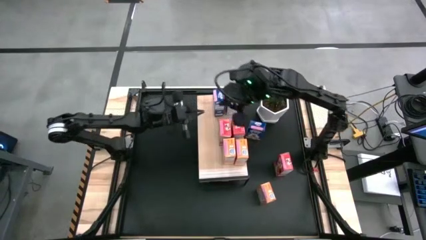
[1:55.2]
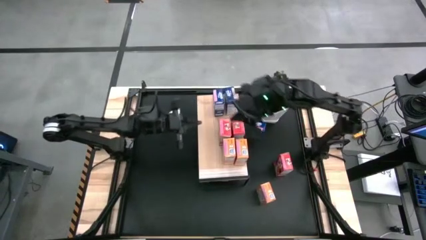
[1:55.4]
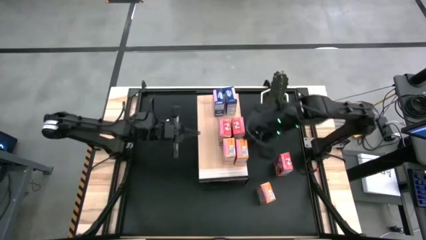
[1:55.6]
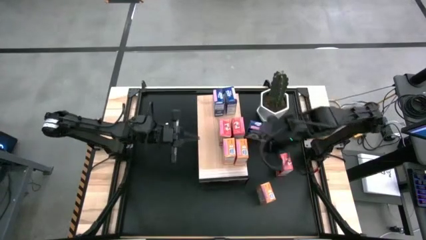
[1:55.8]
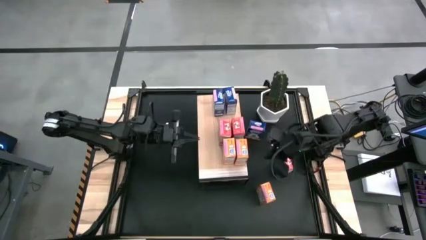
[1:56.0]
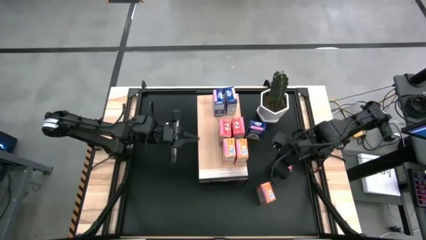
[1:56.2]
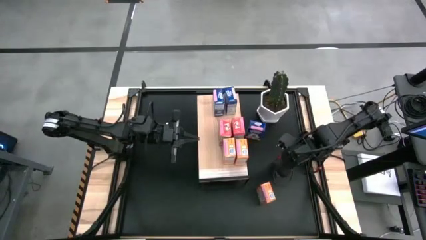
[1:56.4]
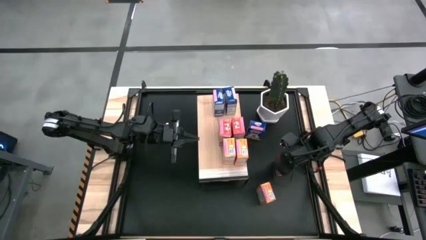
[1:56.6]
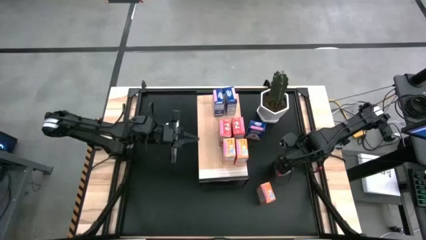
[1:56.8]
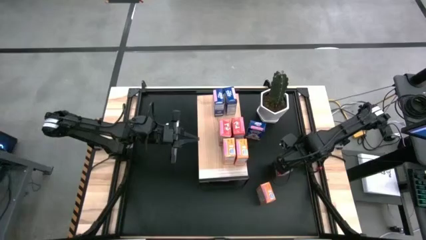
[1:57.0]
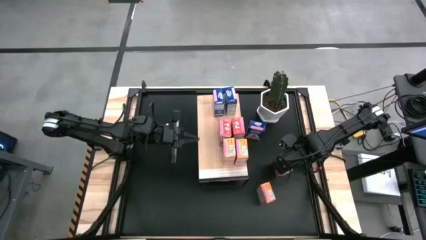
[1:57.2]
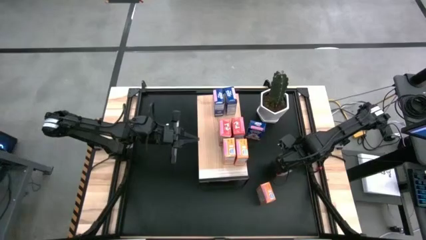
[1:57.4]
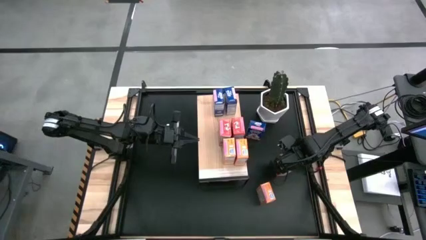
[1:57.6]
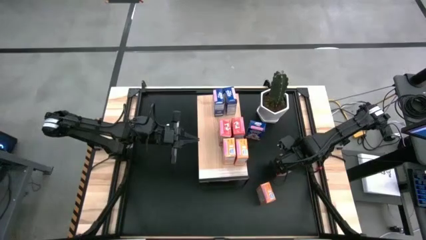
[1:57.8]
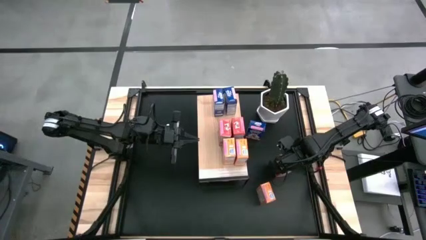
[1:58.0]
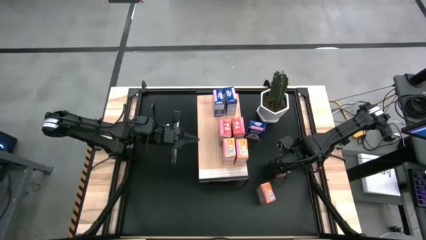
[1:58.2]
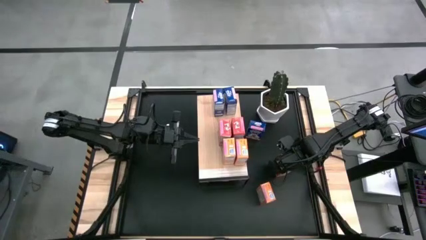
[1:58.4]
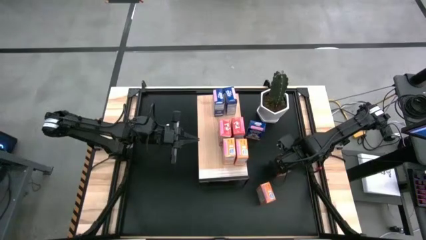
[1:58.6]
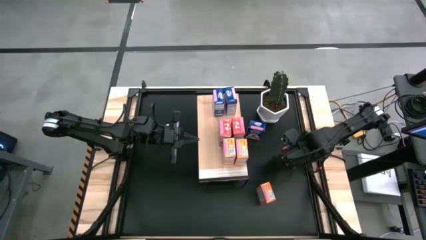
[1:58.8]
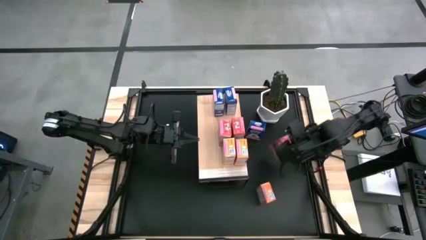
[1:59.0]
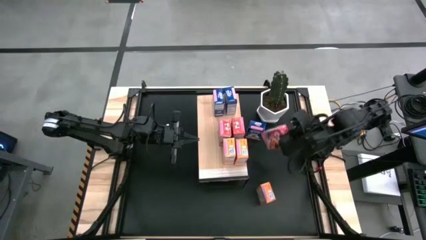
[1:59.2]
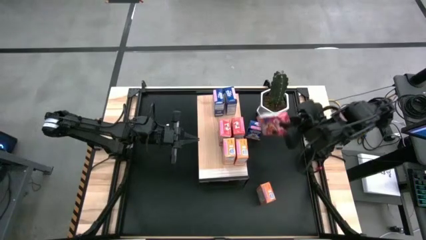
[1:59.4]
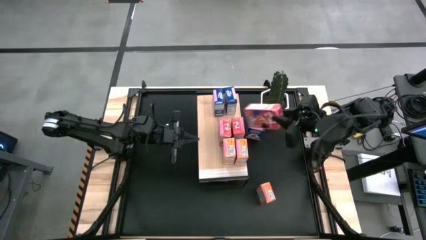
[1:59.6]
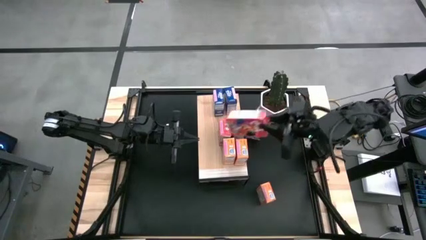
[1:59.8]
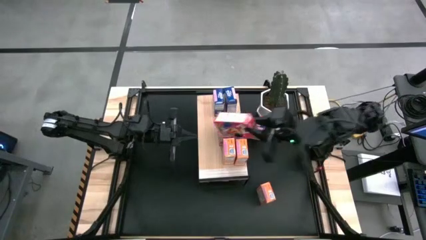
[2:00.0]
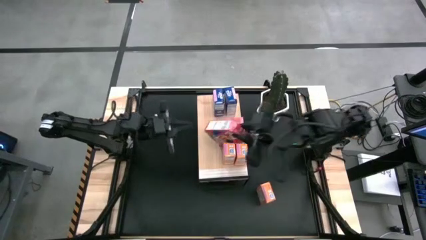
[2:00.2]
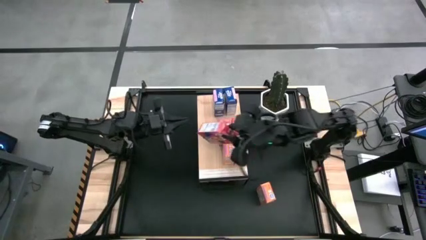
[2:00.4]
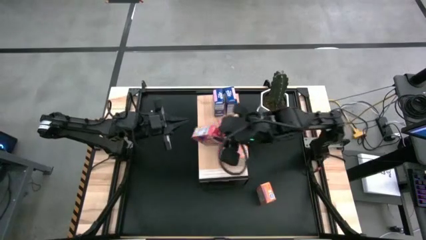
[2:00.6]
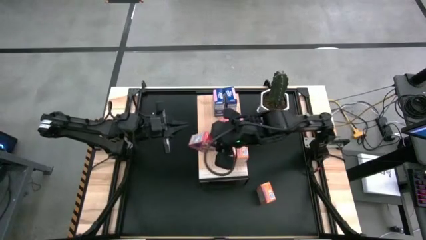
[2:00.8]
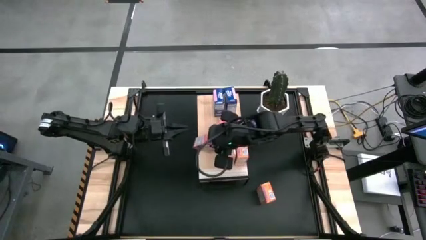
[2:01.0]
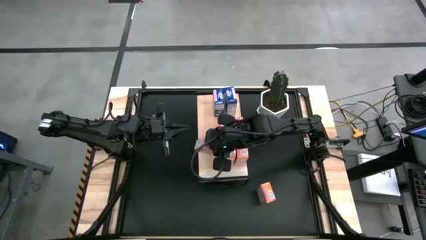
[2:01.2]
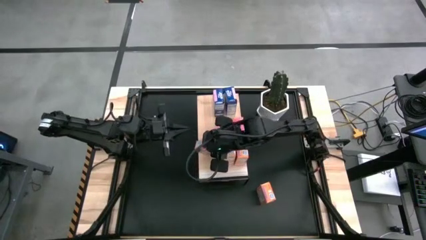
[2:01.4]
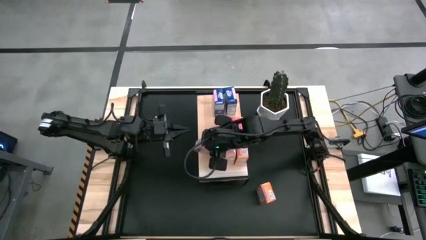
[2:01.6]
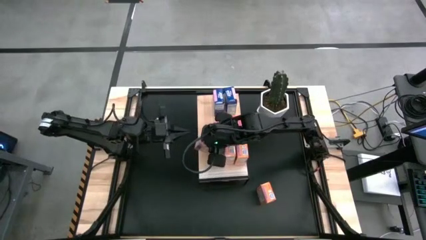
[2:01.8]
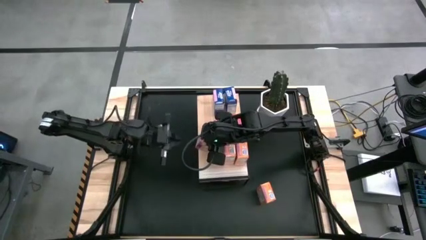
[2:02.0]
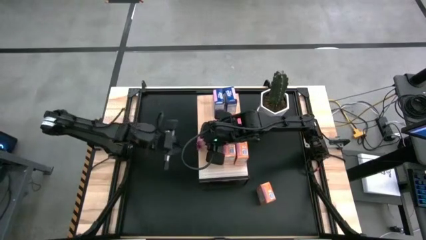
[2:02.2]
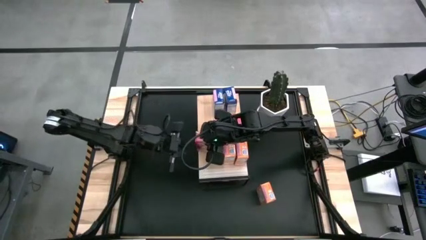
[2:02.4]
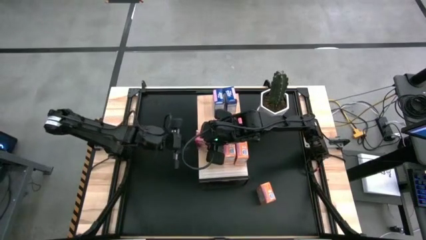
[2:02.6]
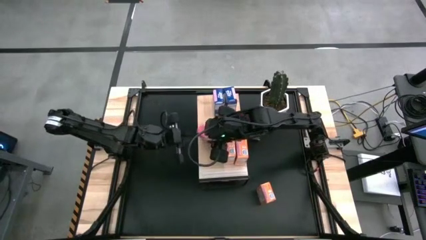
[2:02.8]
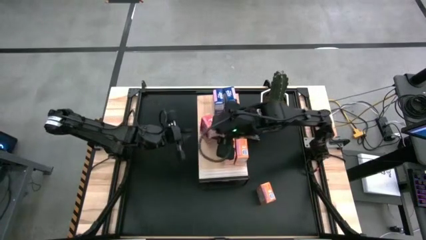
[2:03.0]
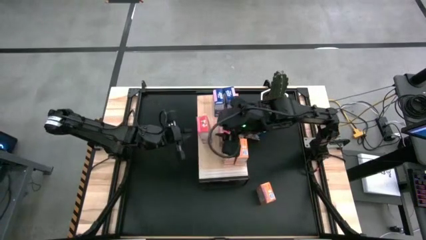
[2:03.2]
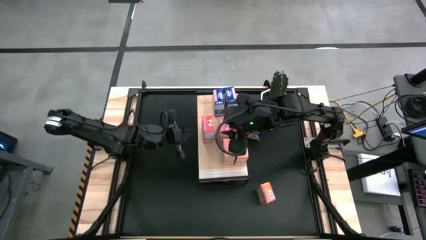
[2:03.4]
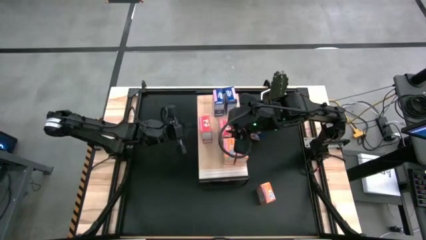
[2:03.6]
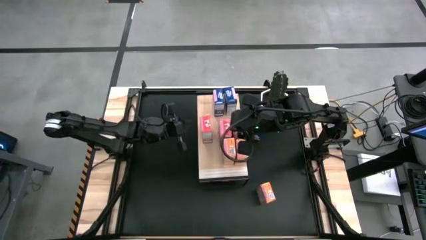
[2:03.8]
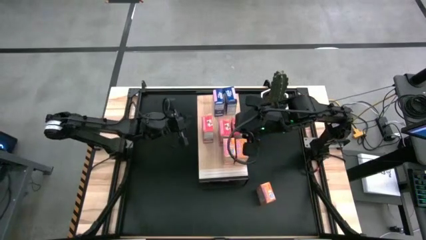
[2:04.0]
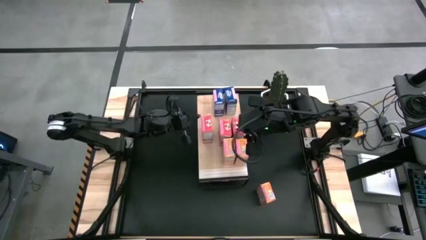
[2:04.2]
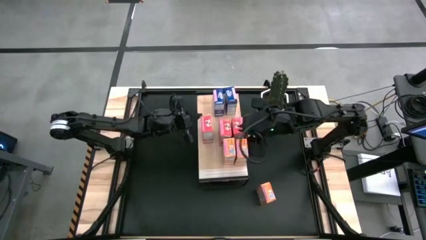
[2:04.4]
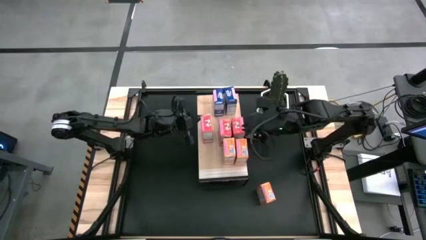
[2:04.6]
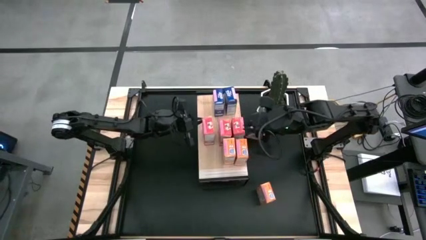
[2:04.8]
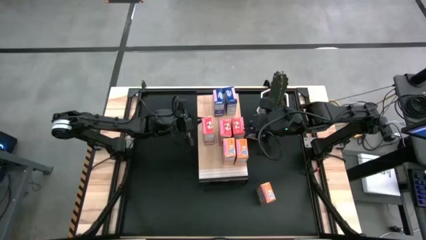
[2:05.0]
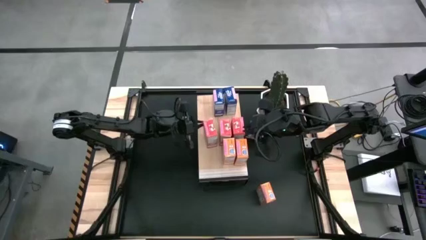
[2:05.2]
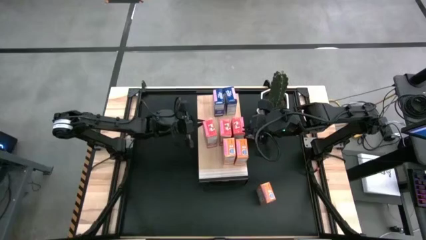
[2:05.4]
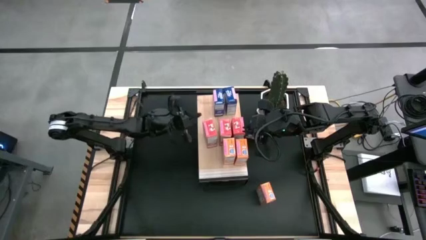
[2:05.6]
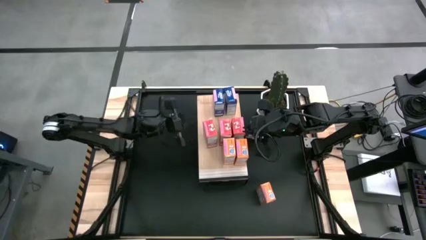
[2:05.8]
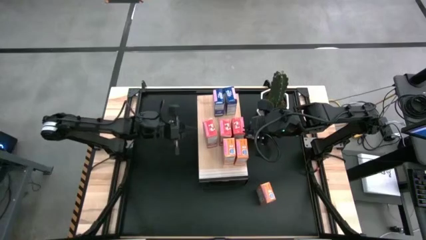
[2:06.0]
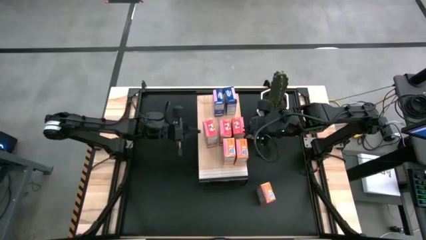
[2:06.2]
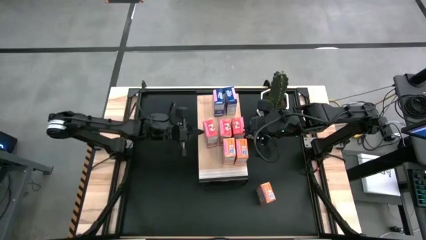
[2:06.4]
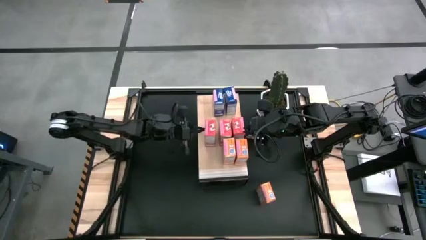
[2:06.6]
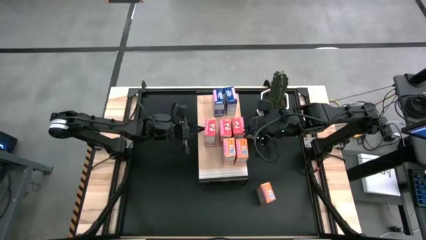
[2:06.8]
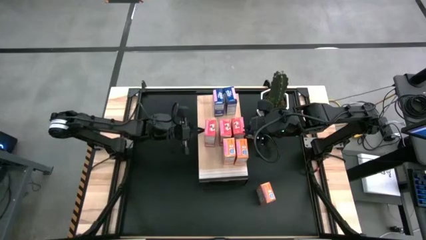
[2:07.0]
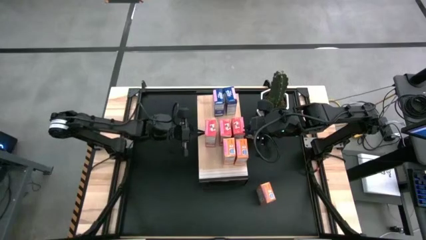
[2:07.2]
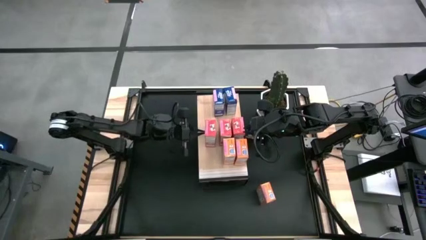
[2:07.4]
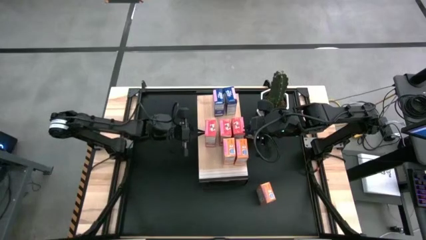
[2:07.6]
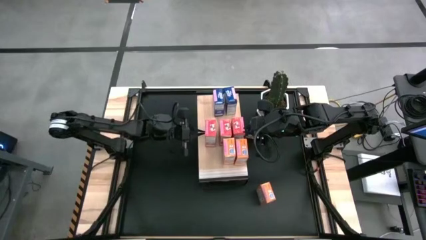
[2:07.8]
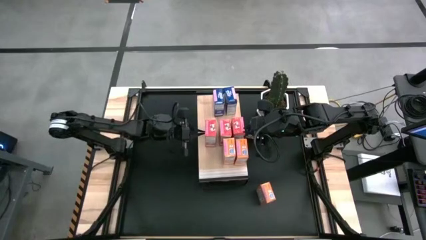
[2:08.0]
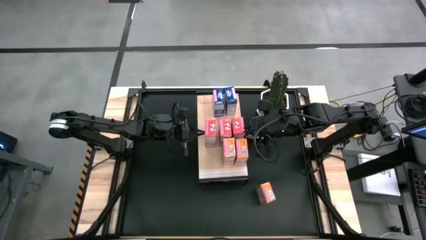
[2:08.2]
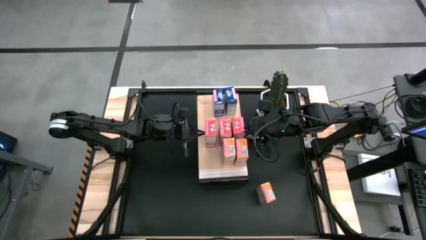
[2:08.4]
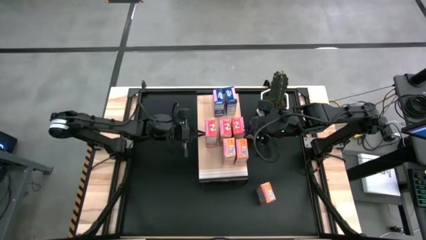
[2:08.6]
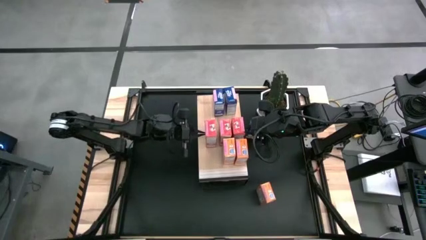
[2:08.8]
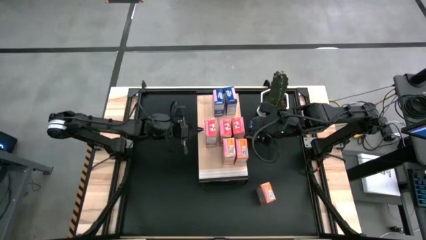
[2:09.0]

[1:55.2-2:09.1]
Task: Stack cereal on shelf
Put the red cereal box aligned with the other red cereal box on the shelf

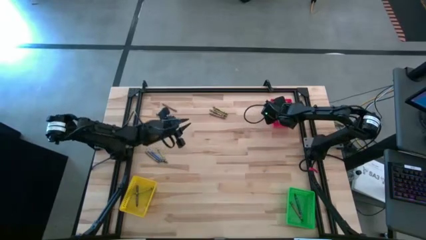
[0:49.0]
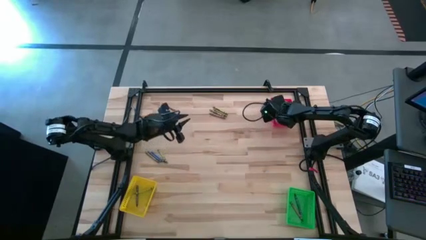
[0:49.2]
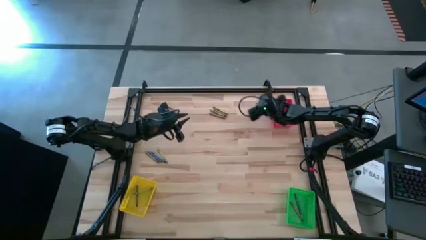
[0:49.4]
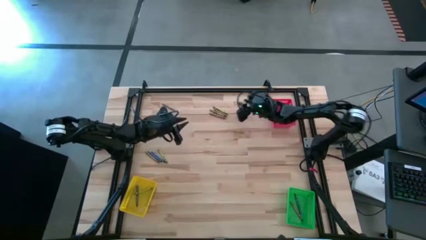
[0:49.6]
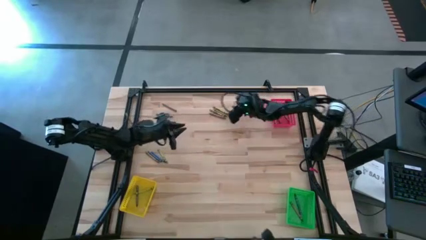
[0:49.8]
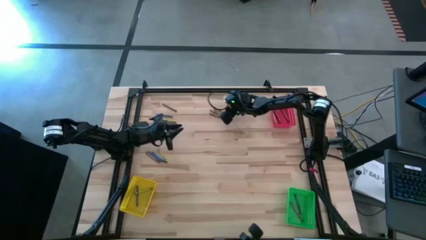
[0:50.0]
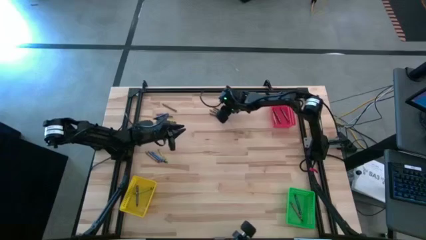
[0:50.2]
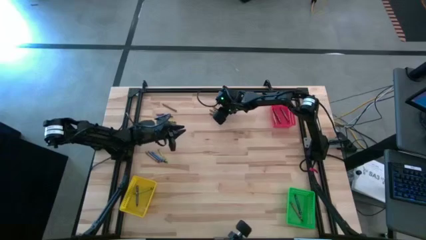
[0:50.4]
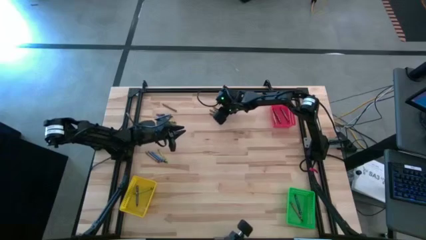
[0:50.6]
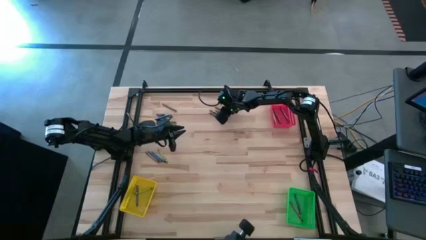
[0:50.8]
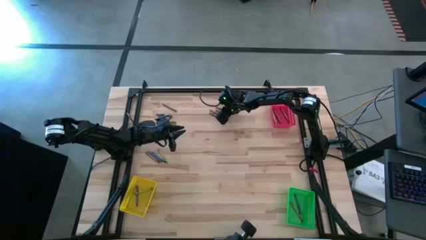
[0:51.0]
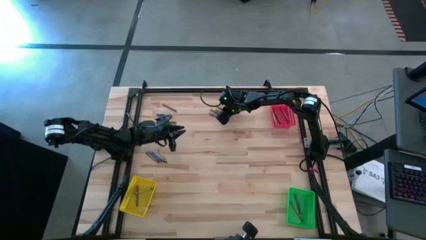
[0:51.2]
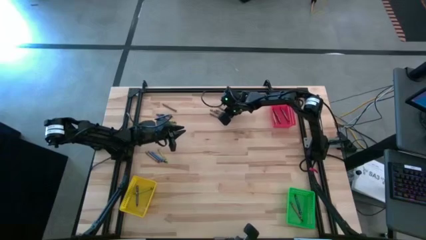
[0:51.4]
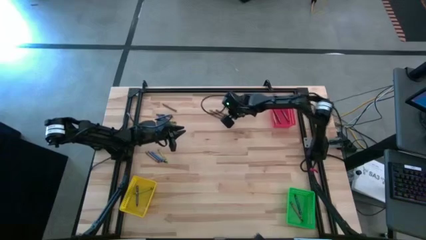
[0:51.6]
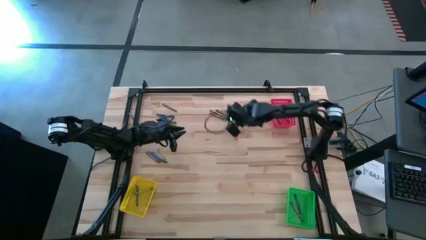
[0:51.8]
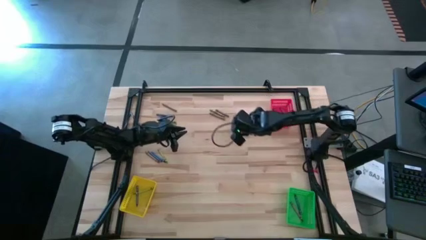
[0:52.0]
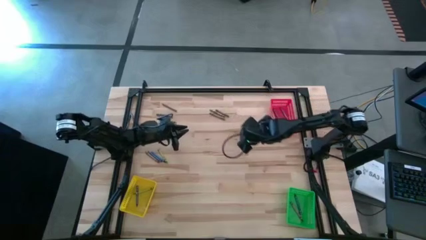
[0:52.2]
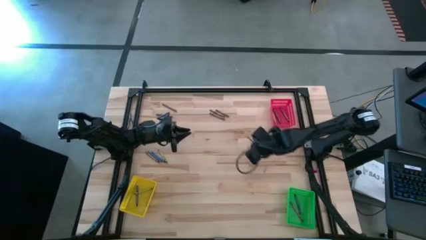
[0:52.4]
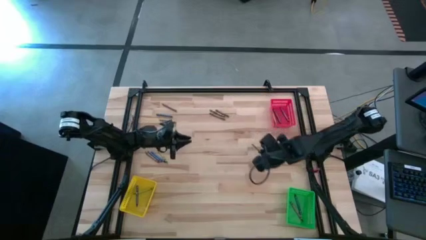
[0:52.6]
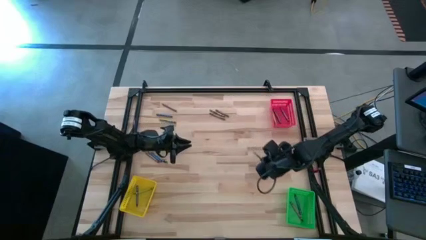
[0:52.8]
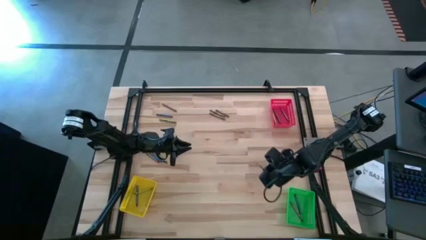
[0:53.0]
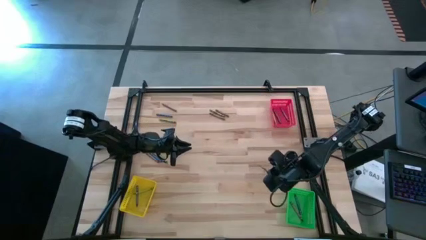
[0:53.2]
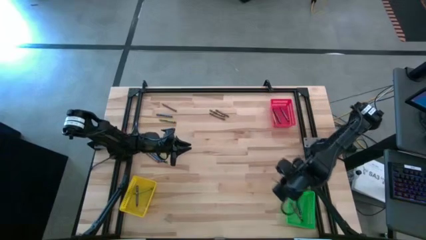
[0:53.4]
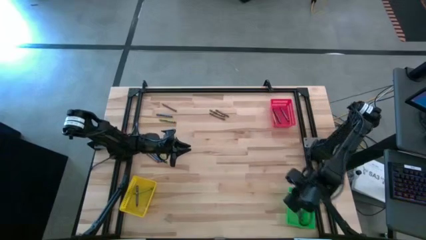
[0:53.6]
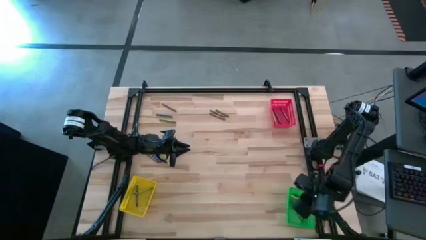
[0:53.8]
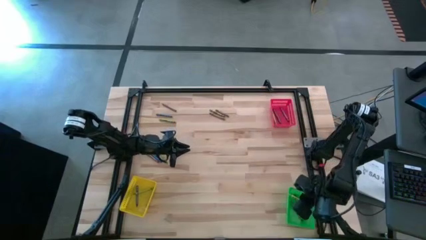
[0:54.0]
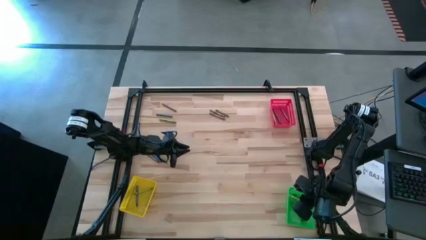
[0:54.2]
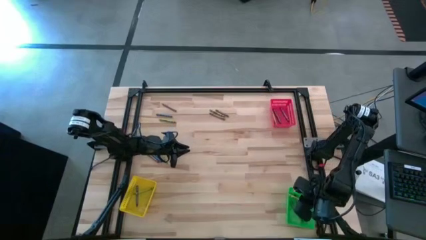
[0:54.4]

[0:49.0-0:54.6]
Task: Sort crayons
Put the green crayon into the green bin
